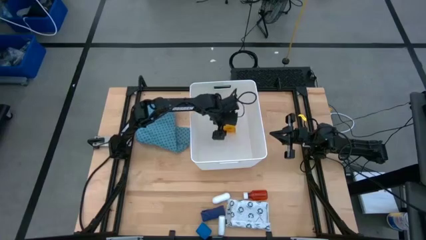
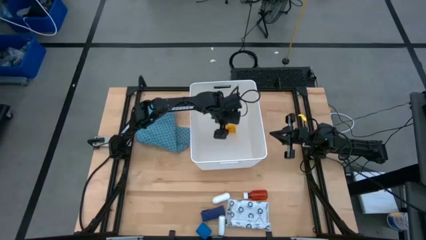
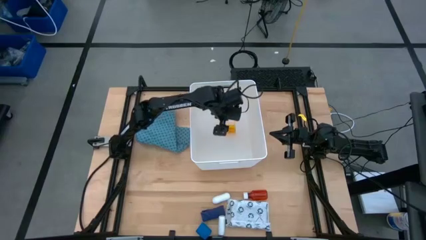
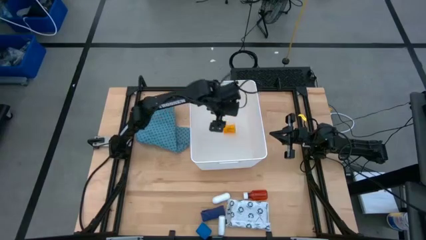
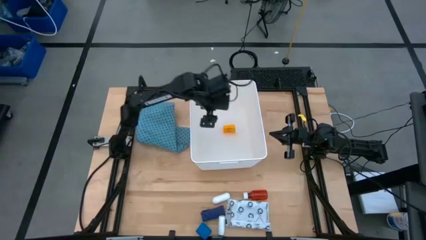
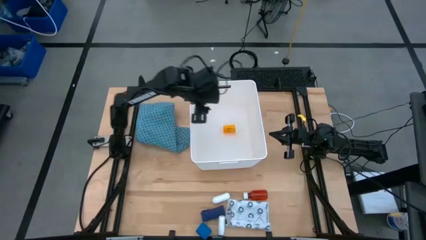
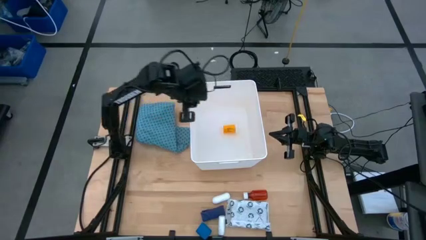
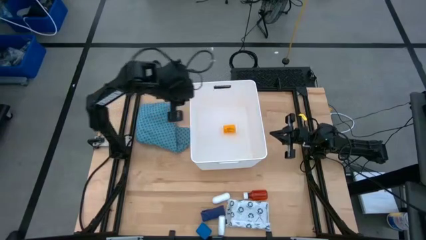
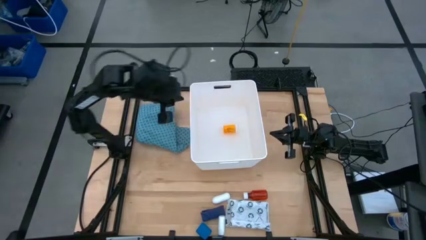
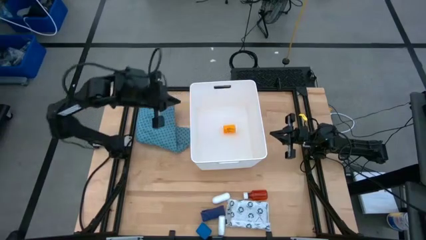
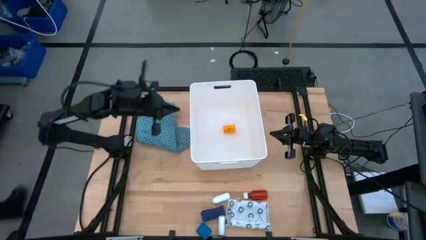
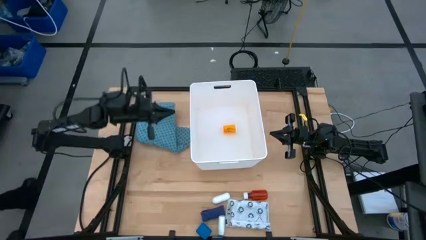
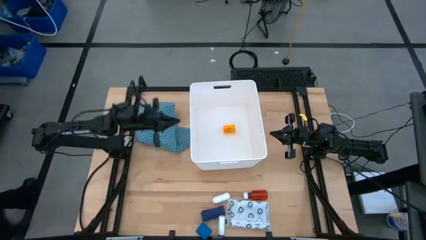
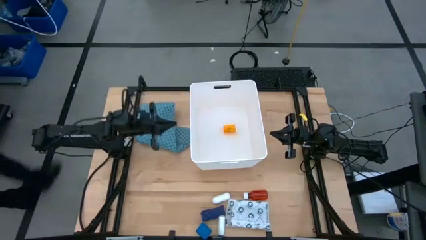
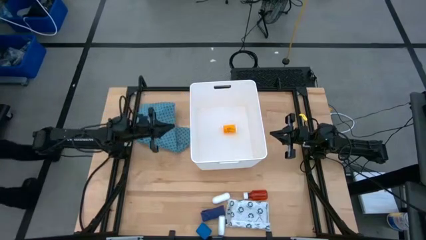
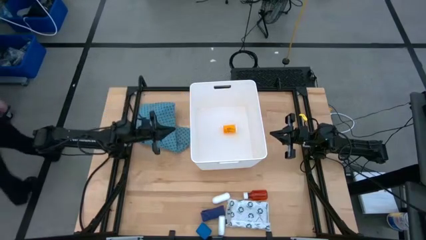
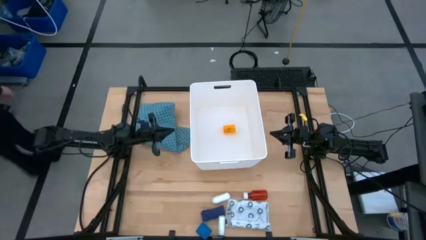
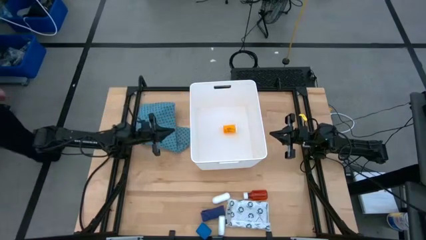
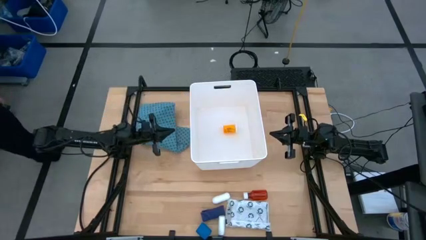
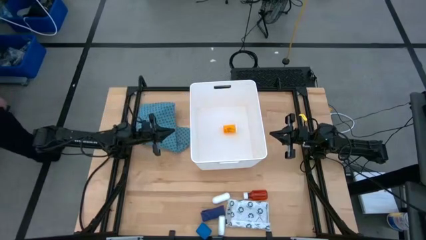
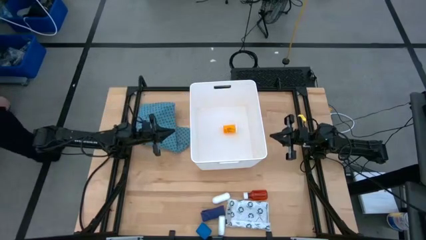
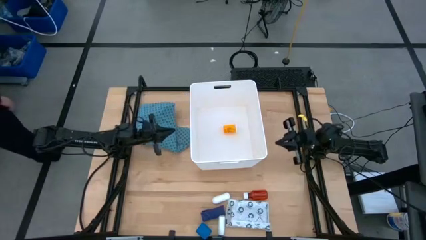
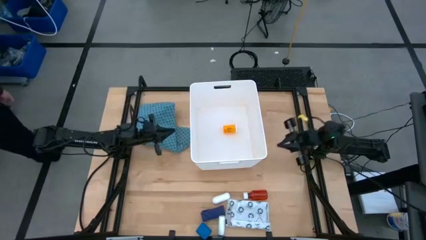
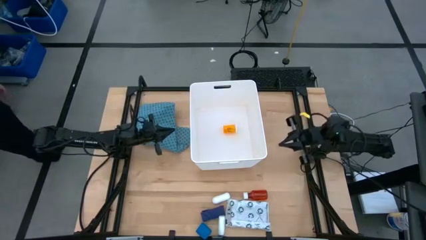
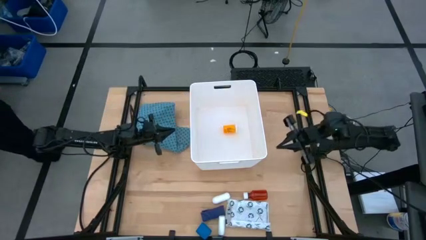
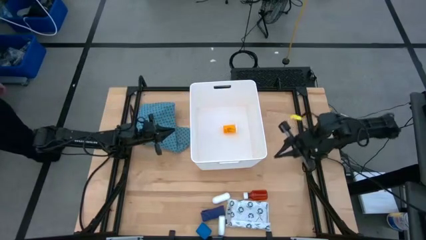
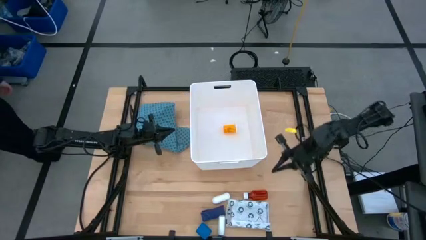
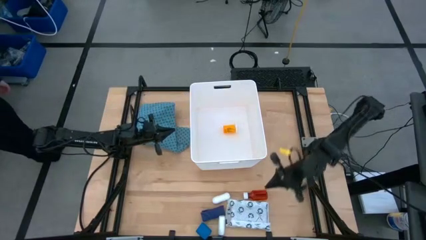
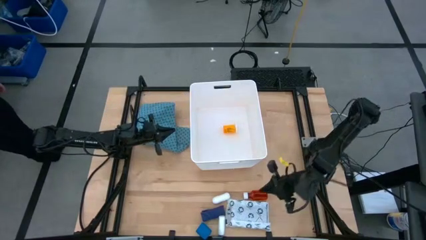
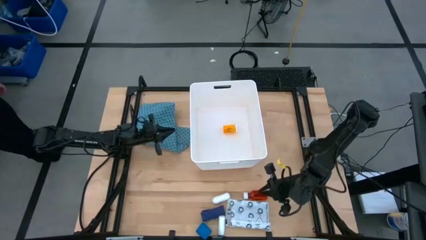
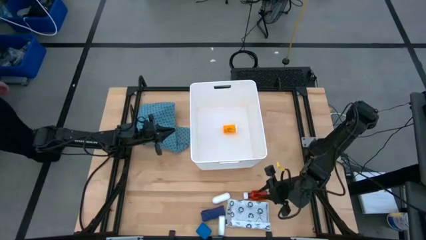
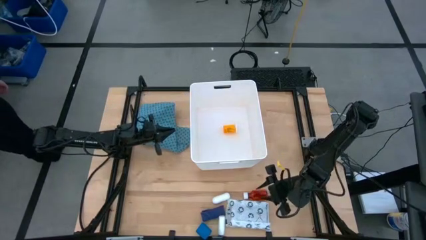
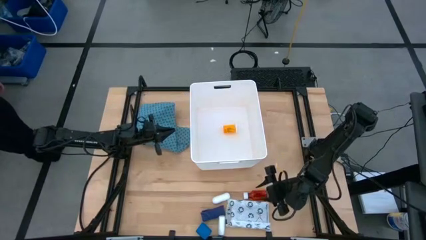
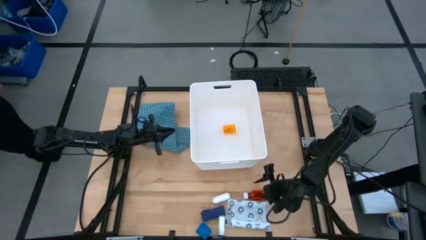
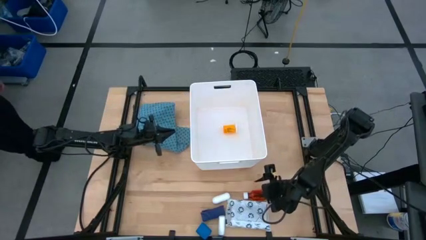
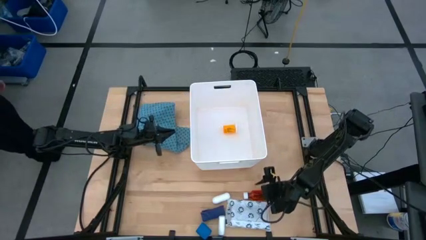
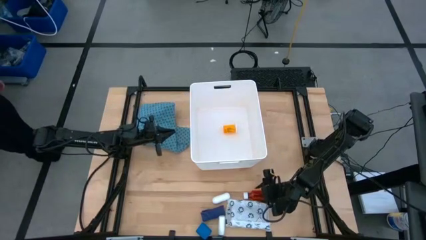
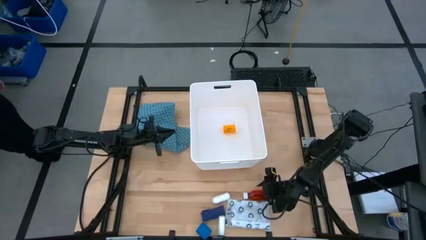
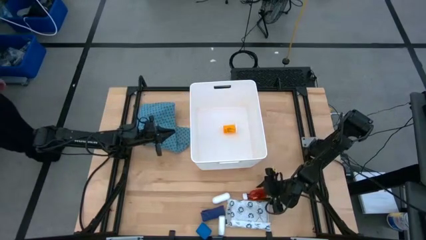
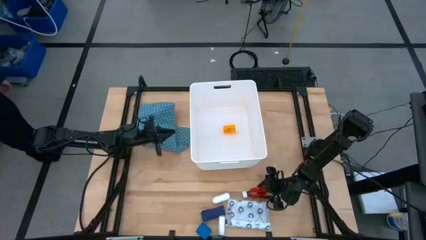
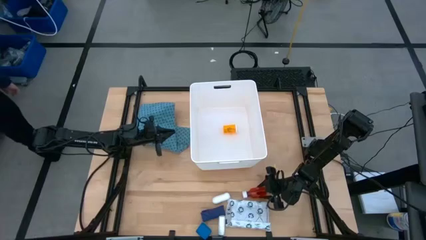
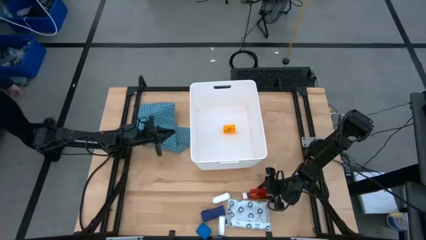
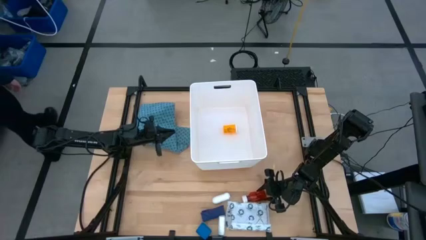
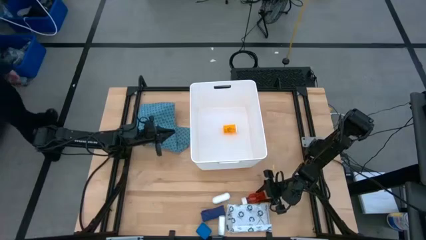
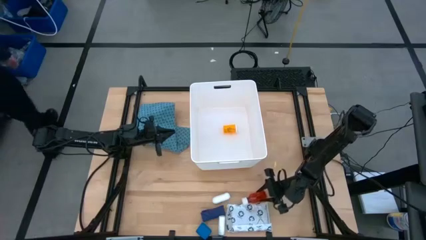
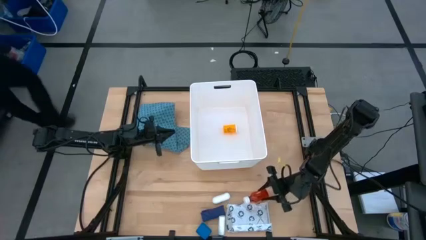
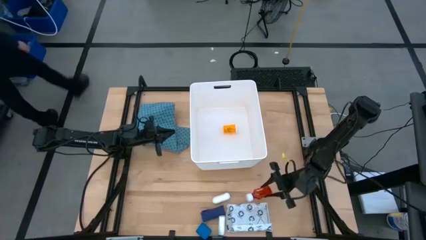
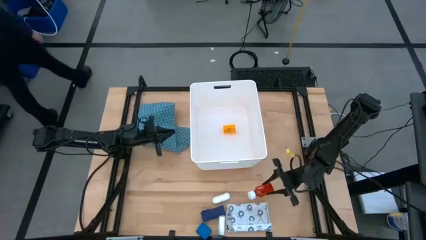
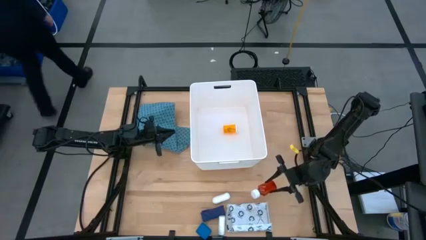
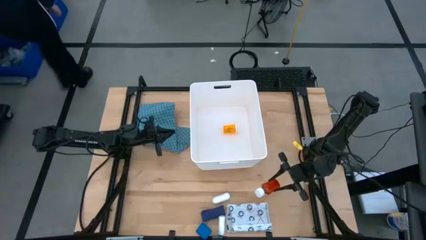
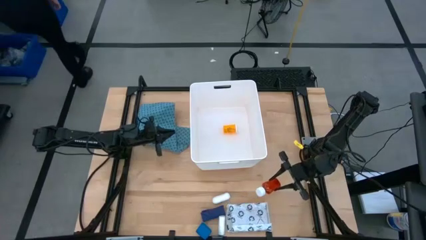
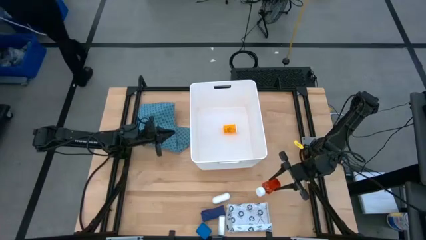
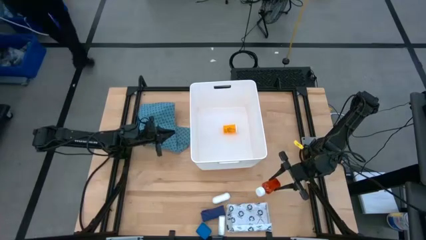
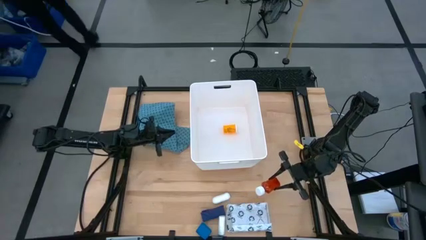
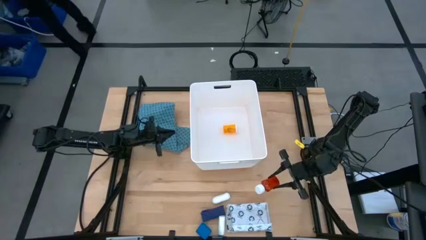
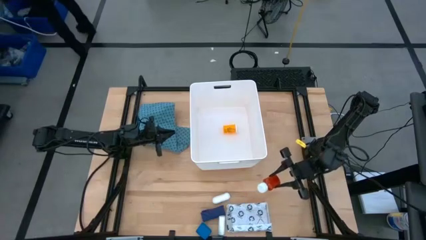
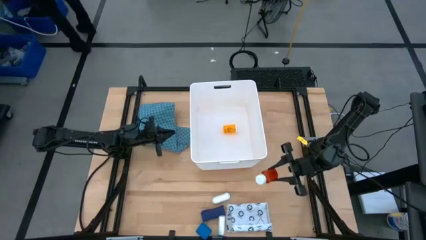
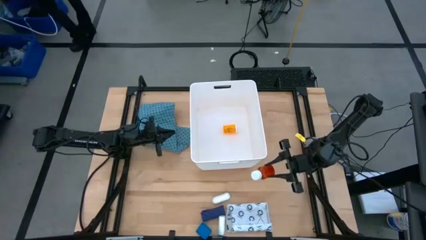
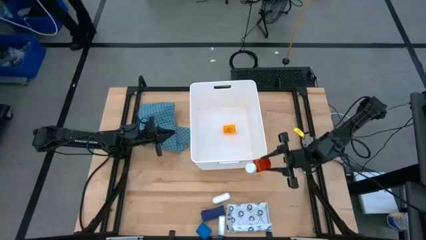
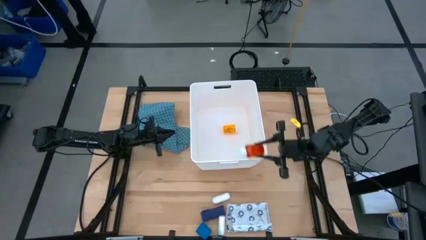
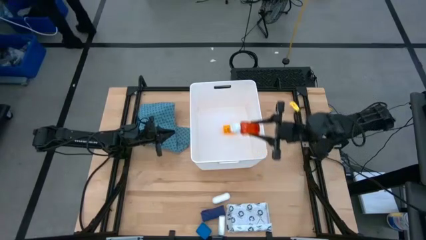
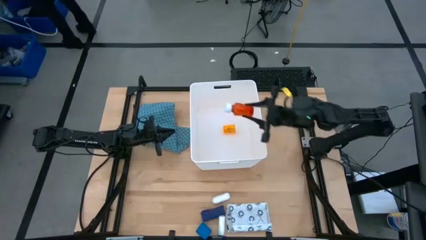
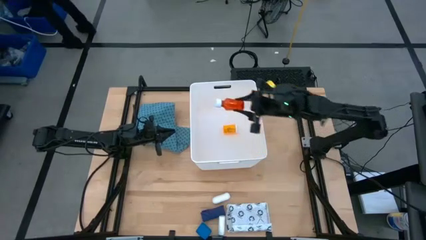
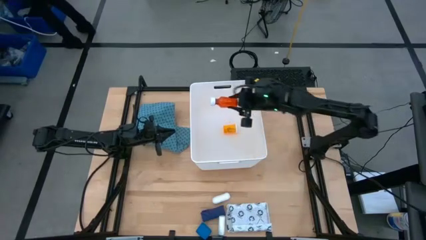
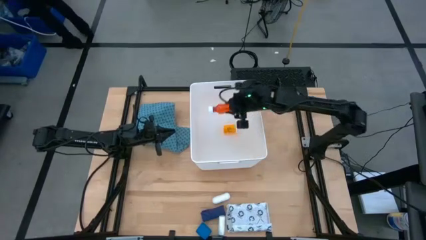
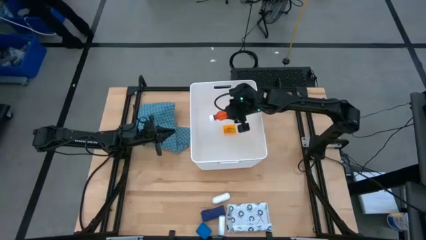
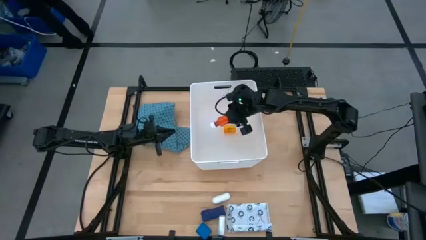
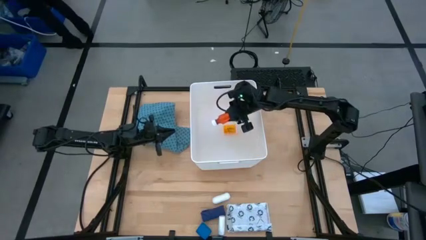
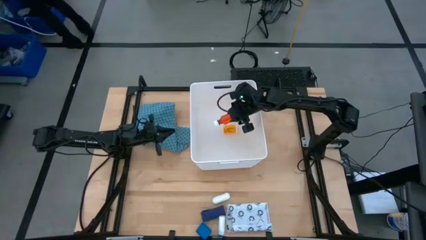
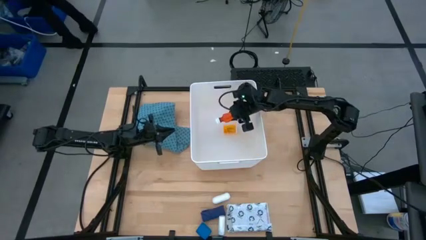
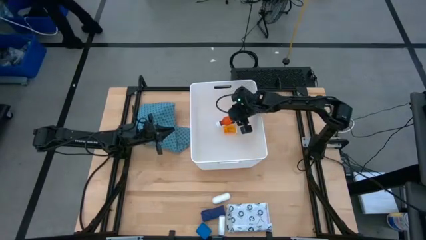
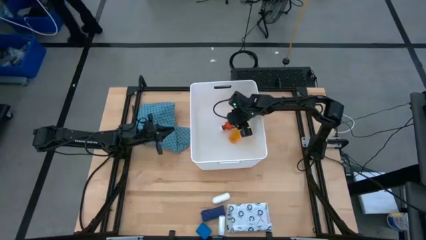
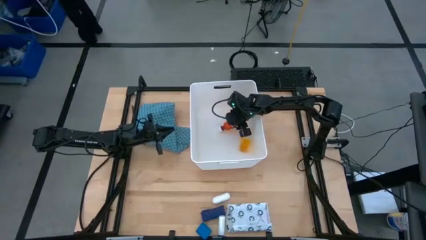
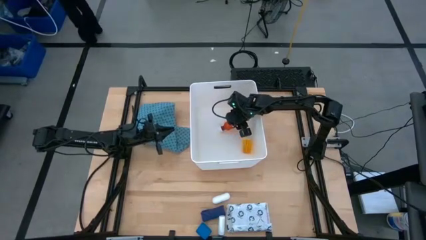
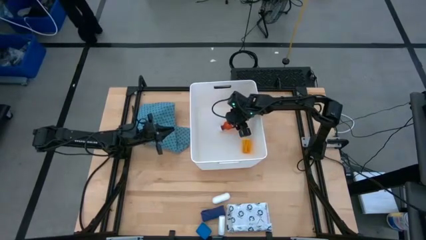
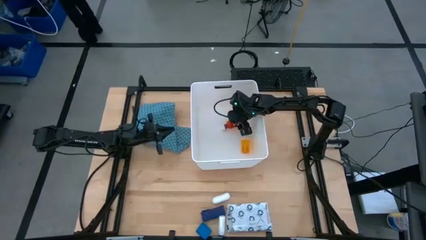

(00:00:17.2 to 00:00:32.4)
Task: Pick & place medical supplies in basket/bin
Put the medicine bottle into the white bin

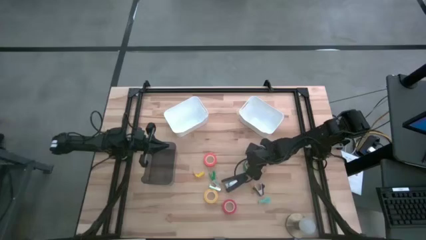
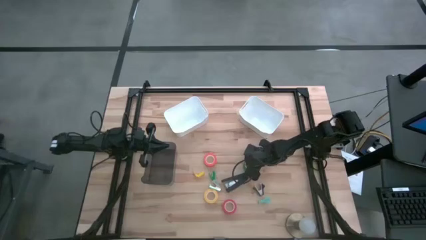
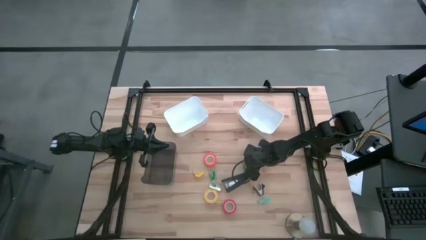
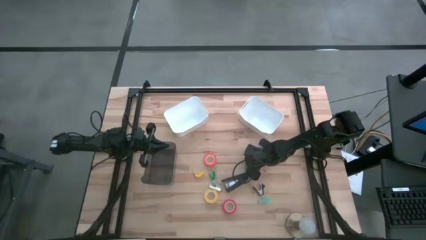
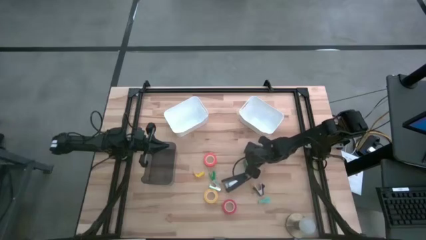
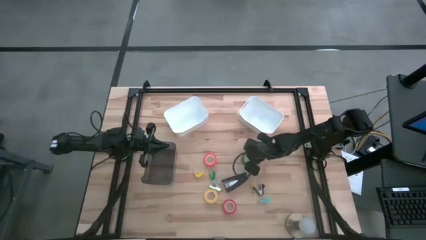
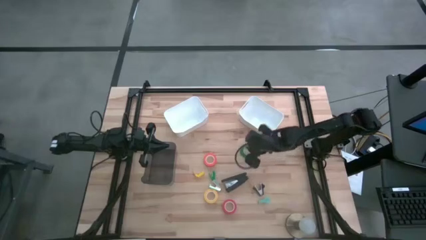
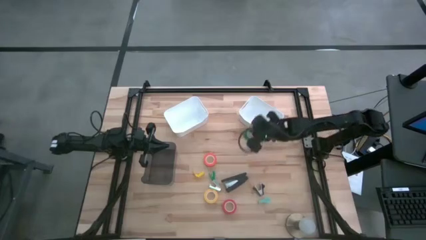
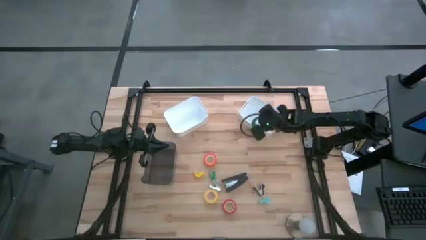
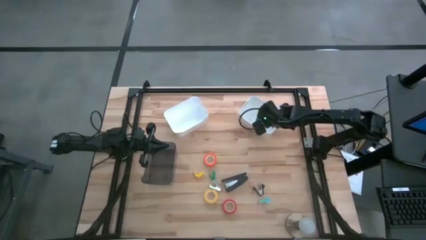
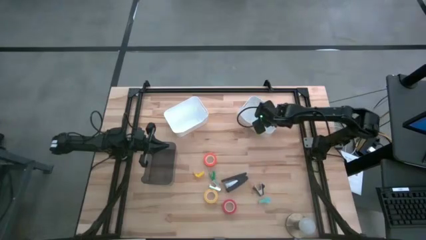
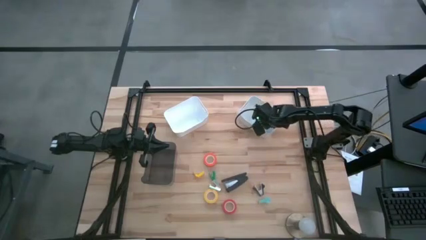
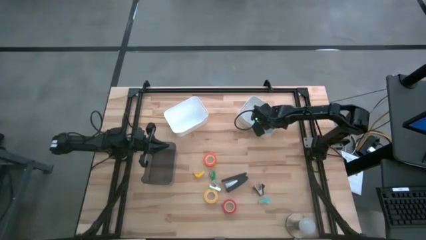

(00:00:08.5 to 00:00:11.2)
Task: Pick and place Stapler, Stapler remover, tape
Put the green tape into the right white bin
